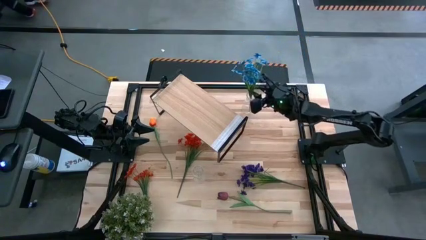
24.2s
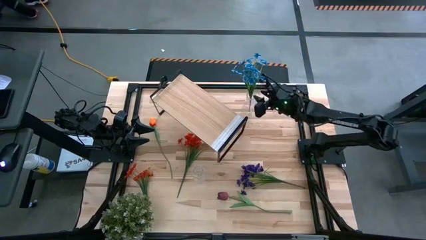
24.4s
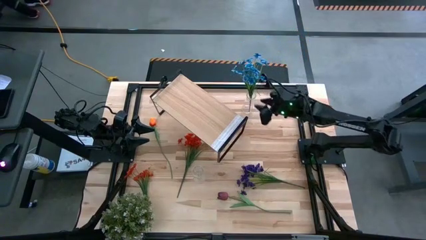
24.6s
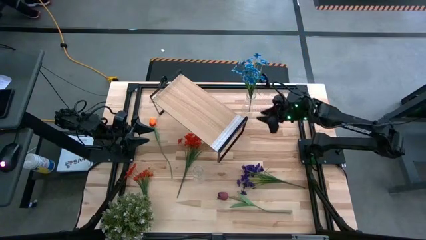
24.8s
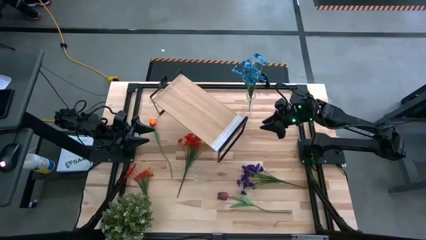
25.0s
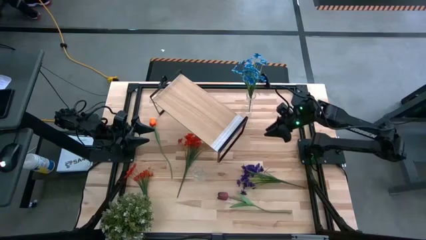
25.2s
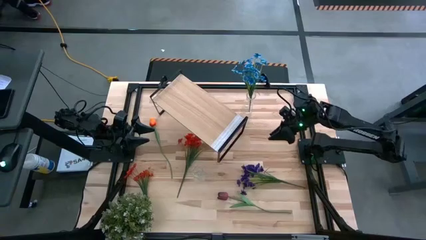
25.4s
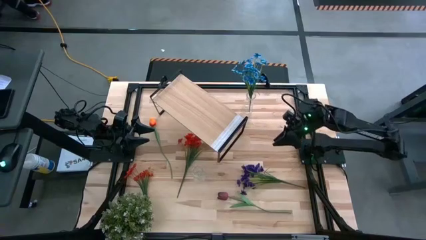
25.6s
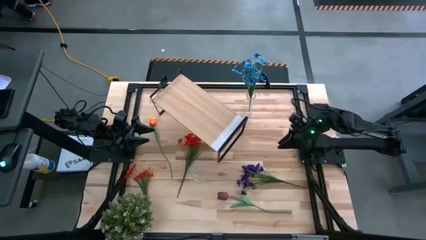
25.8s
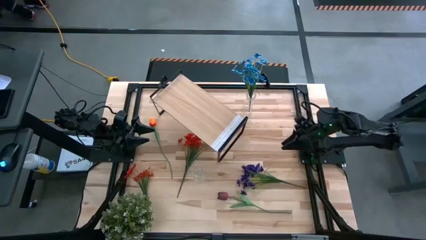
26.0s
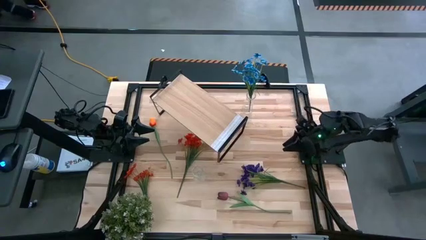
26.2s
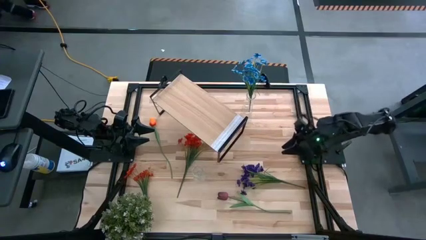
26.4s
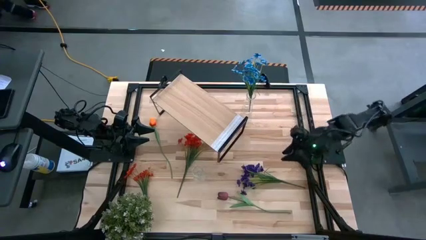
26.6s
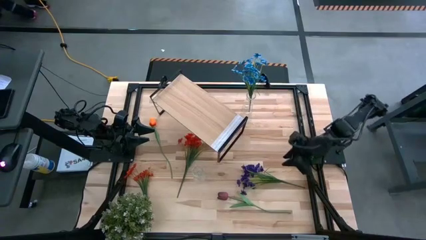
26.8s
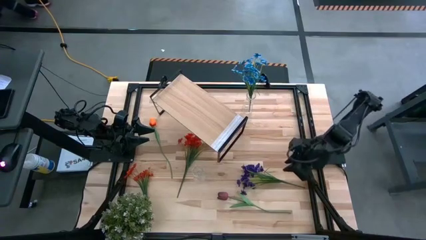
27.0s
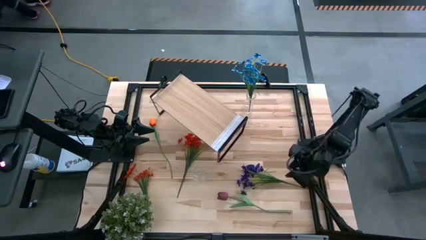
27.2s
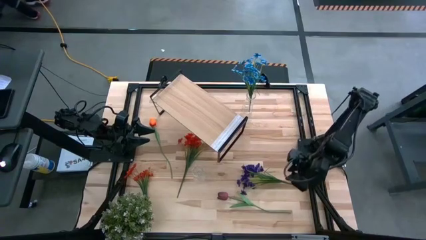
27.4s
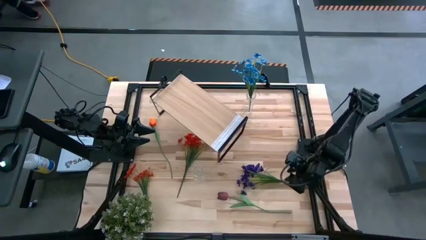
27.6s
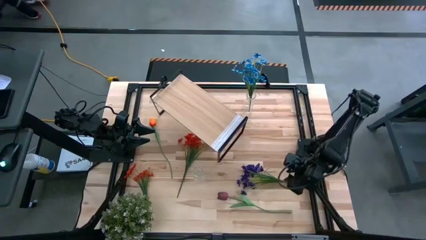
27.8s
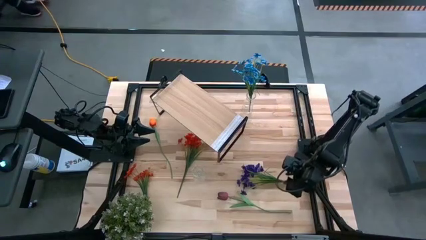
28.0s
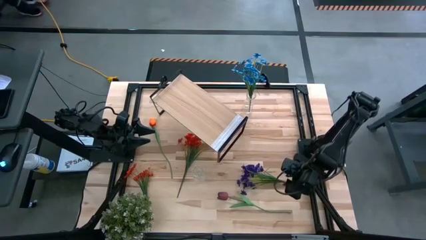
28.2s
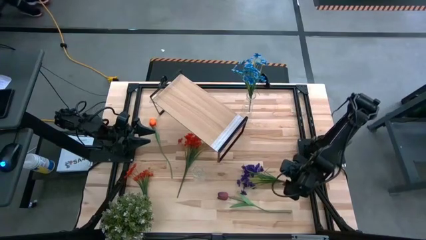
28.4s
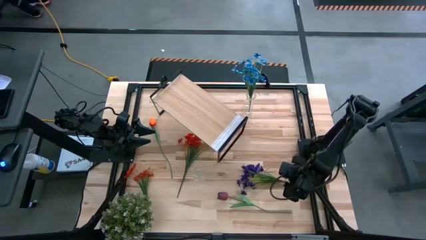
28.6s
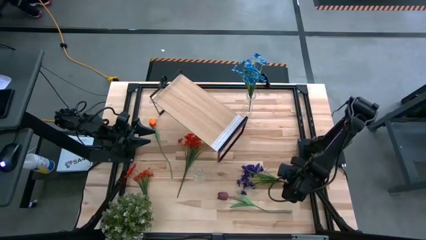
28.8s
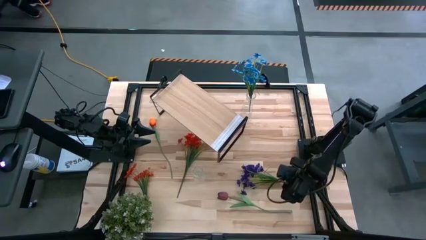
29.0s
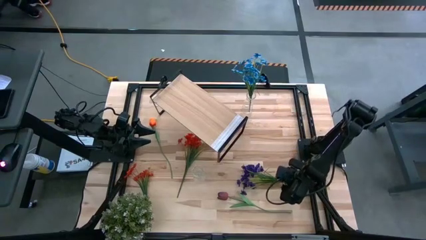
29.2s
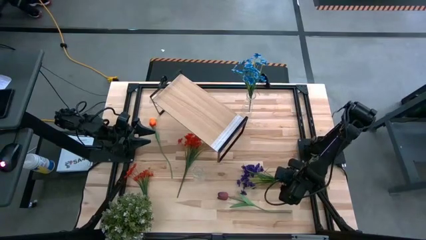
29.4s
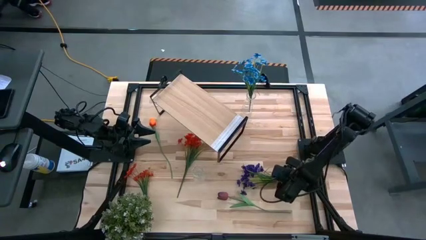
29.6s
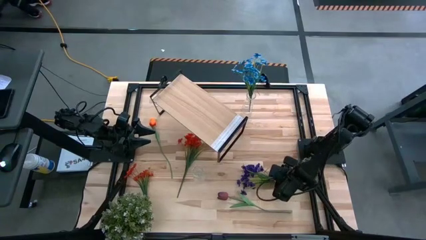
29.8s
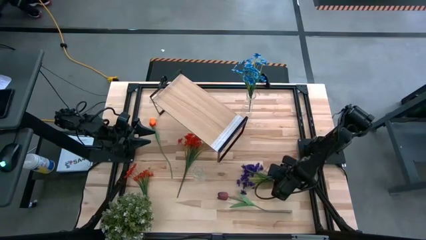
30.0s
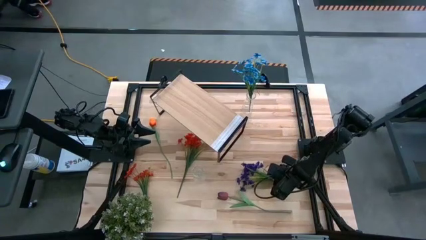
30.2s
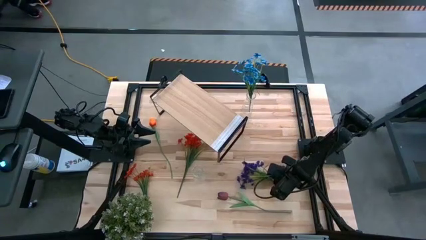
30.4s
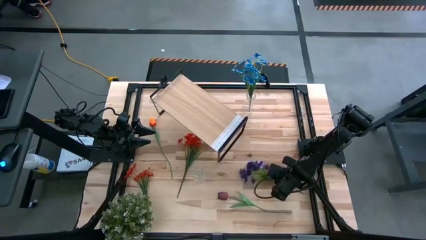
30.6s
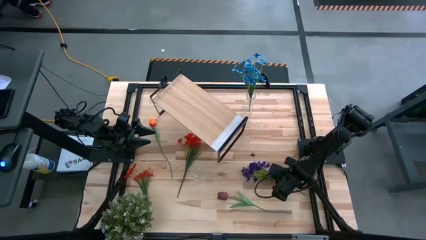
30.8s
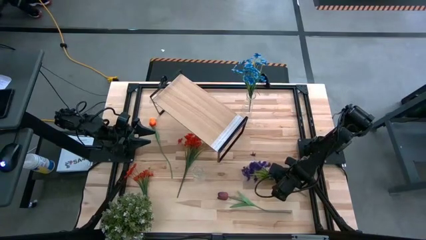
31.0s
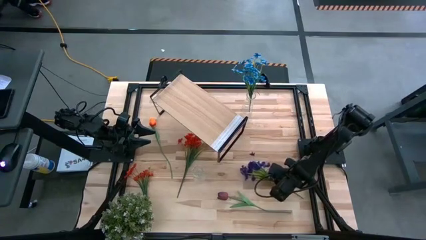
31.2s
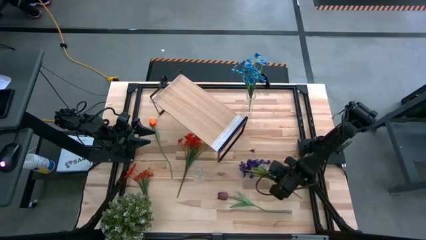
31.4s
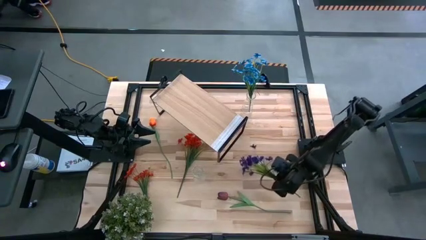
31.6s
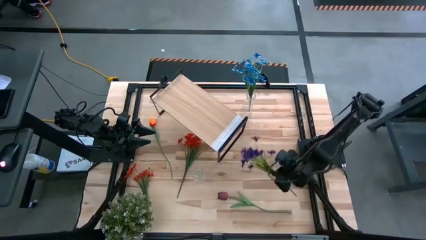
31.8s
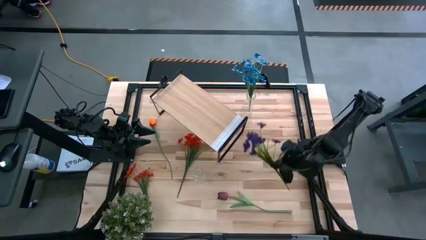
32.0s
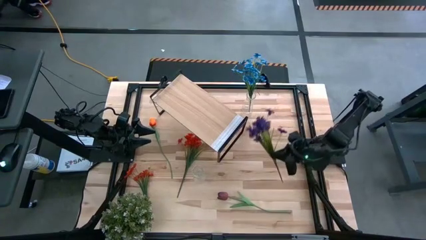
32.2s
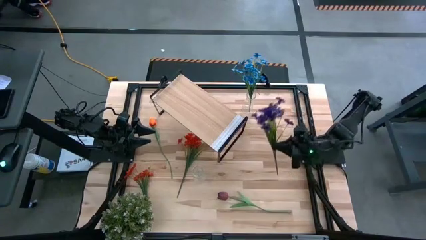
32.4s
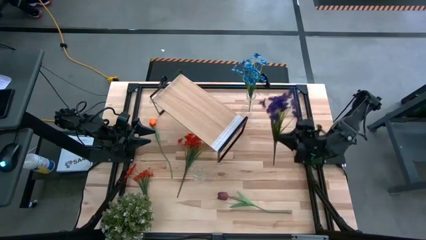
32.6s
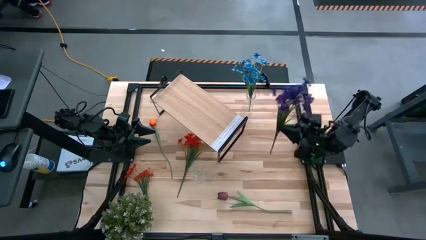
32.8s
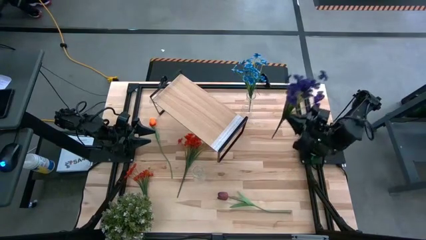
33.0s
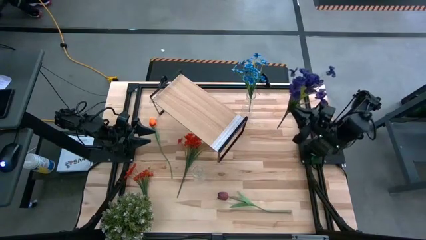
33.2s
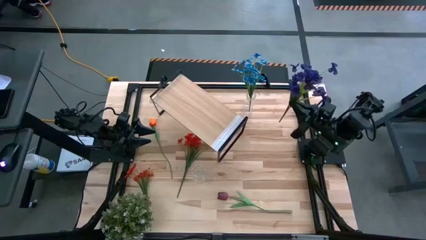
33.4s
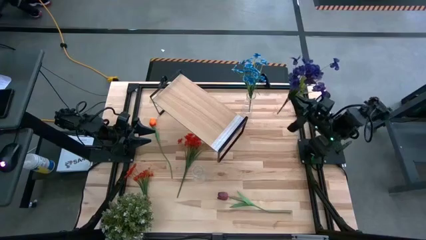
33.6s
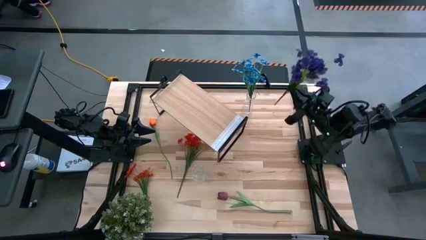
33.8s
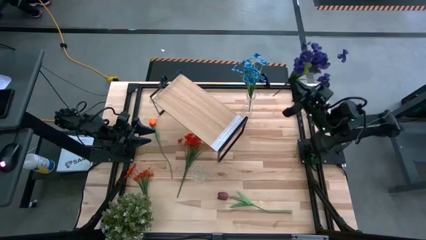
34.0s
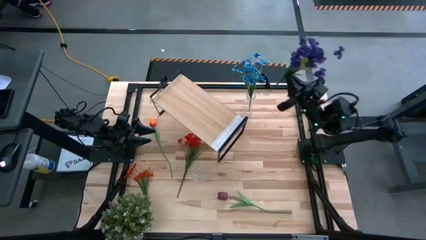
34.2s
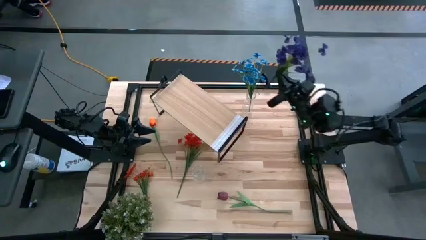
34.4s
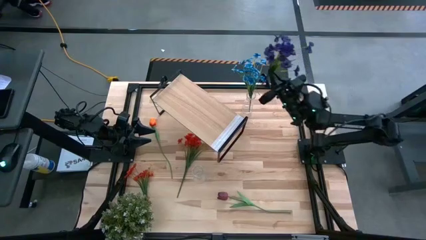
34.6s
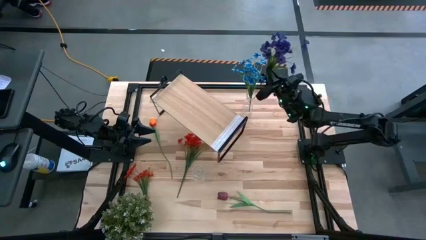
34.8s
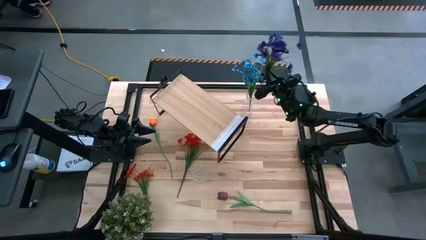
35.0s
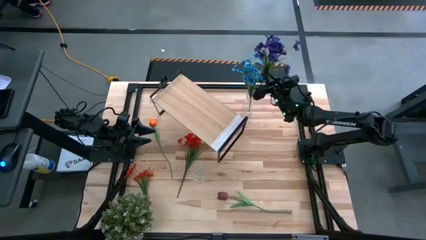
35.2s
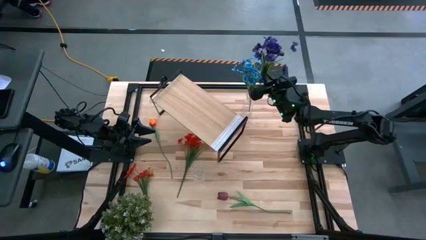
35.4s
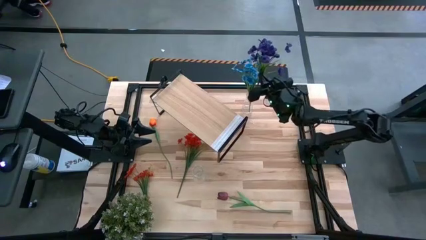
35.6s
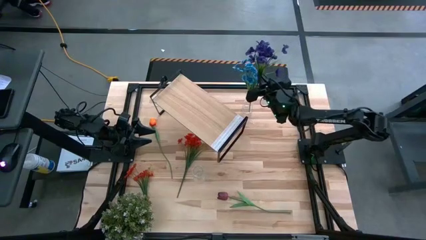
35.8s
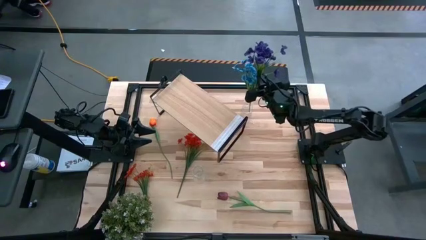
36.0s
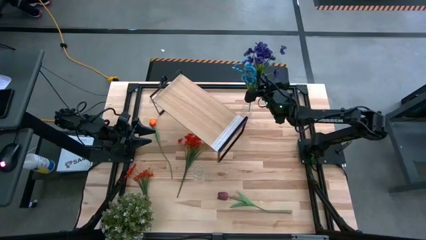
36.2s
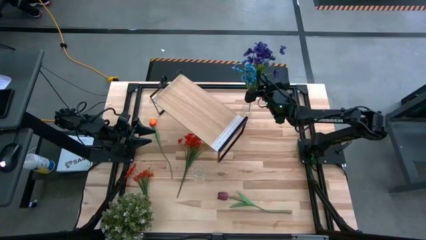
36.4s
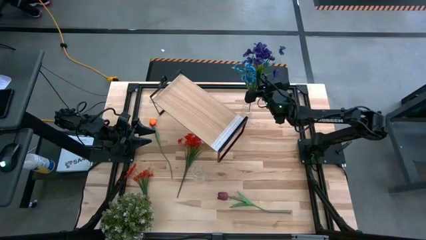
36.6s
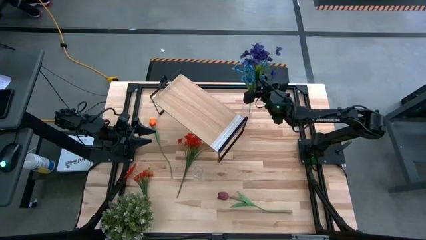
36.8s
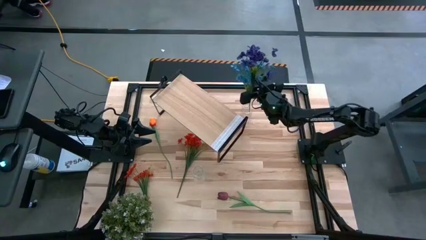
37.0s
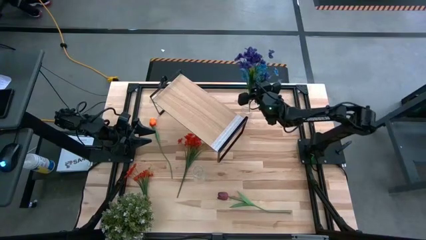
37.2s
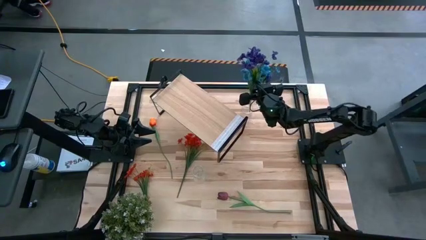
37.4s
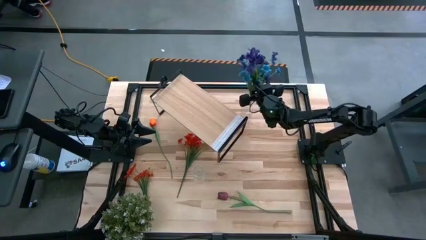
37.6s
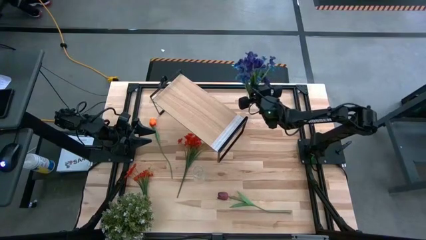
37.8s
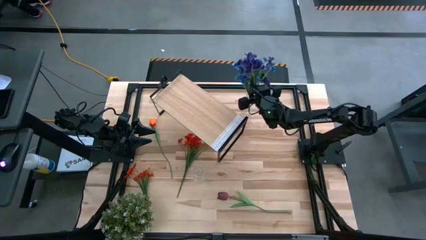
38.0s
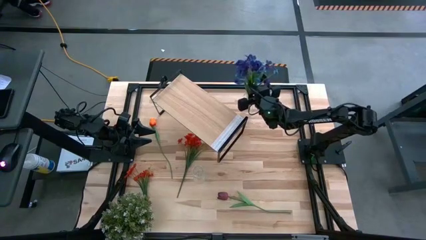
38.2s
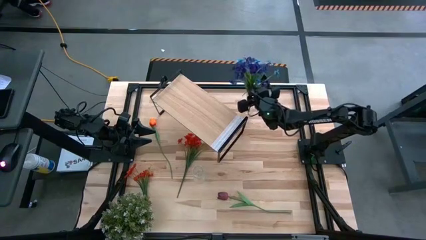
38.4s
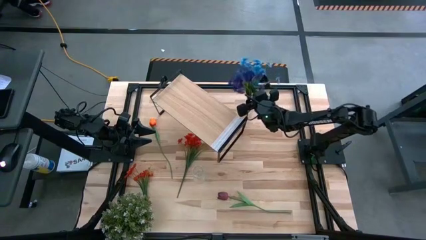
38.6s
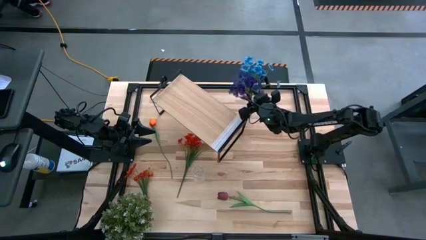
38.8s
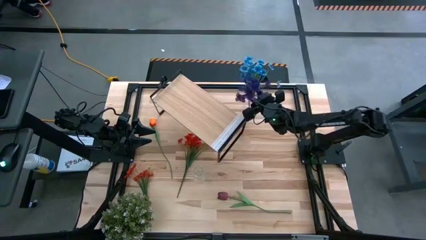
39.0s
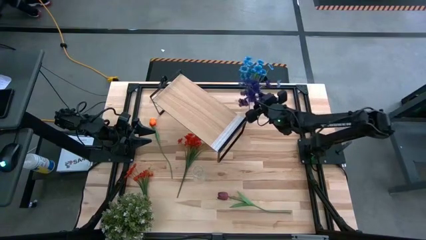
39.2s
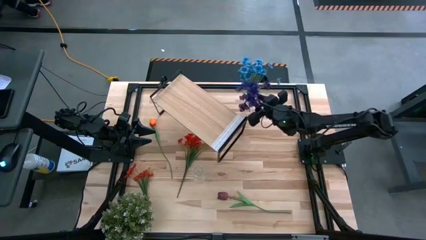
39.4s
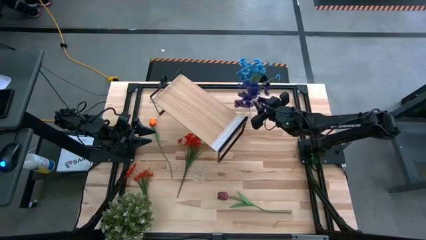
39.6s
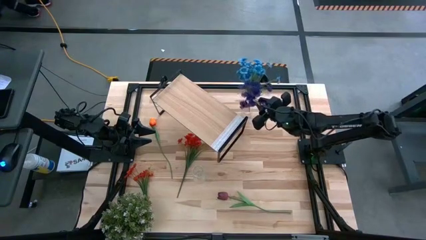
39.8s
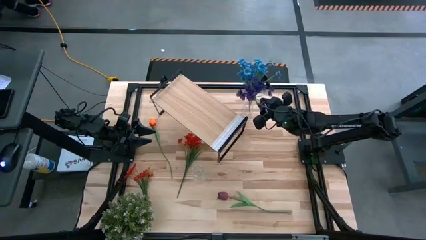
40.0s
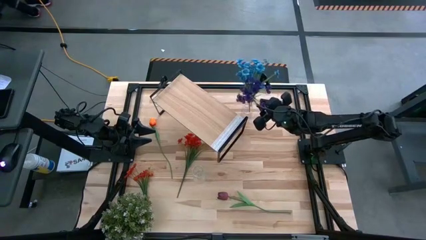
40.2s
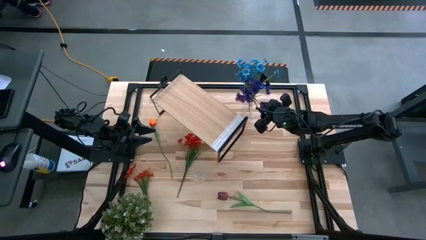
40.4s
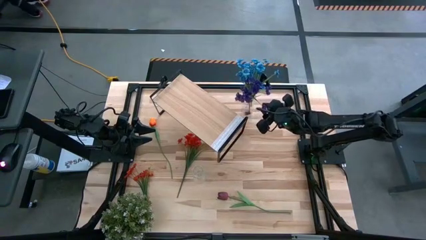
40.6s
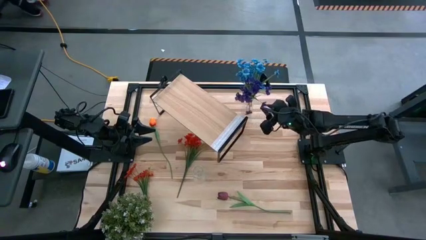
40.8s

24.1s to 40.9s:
Task: Pick and place flowers into a vace then onto a shelf
Put the violet flowers into the top transparent flower vase
